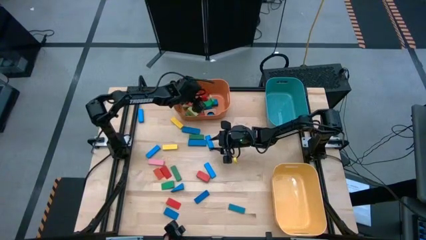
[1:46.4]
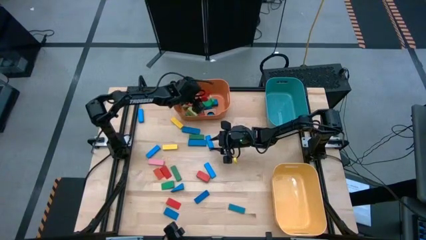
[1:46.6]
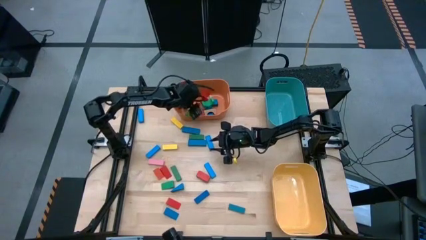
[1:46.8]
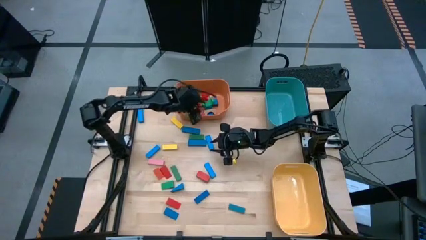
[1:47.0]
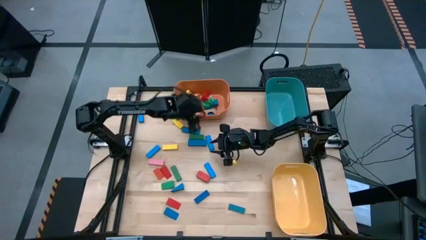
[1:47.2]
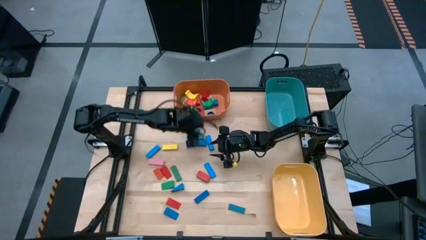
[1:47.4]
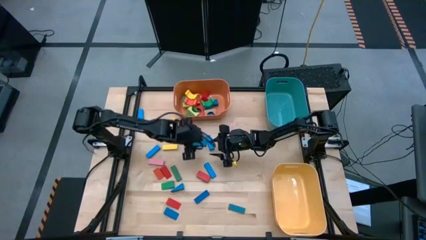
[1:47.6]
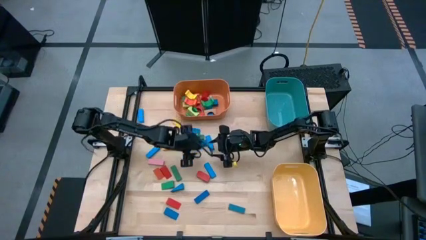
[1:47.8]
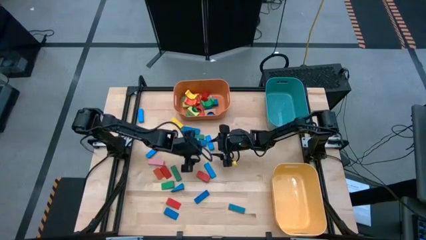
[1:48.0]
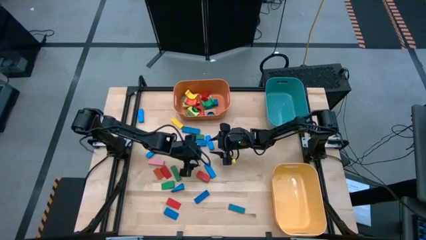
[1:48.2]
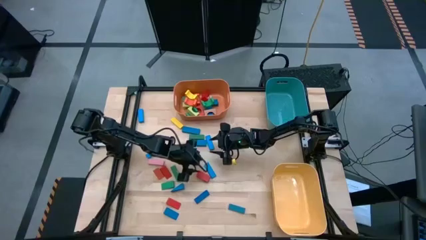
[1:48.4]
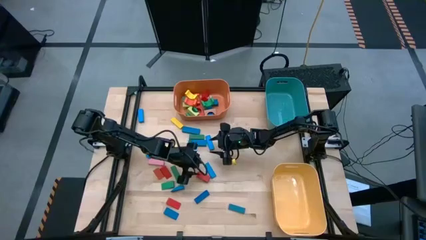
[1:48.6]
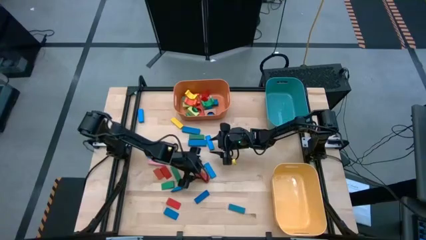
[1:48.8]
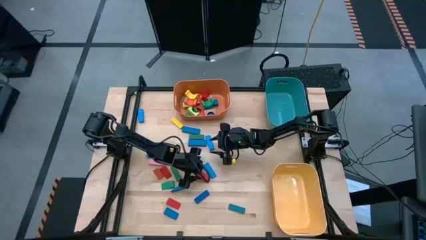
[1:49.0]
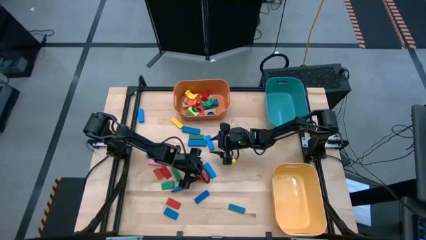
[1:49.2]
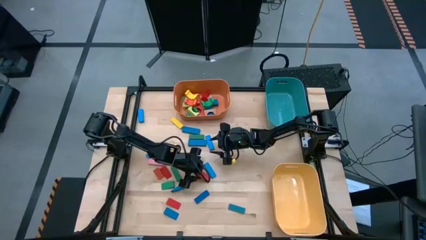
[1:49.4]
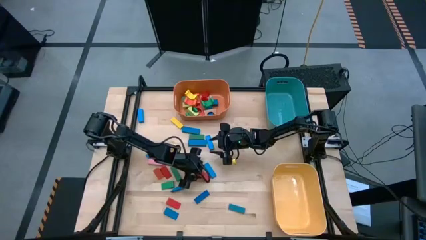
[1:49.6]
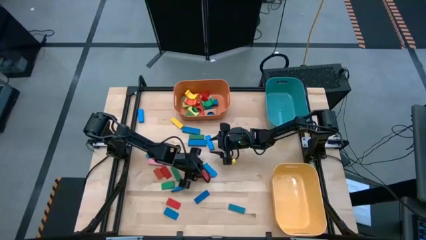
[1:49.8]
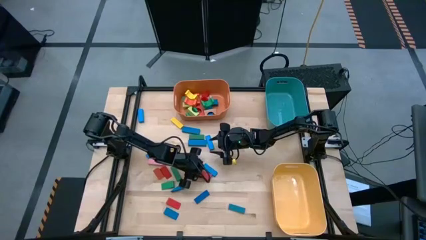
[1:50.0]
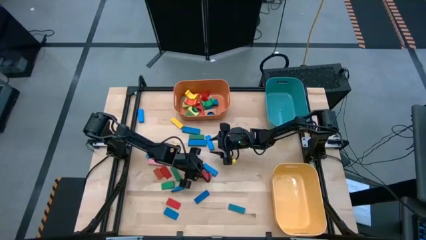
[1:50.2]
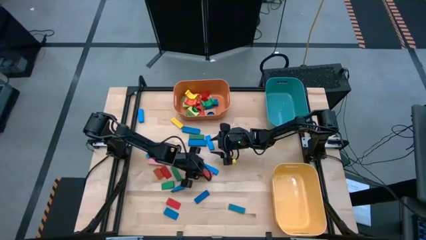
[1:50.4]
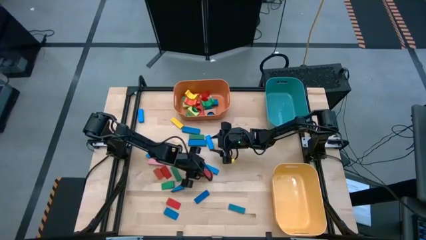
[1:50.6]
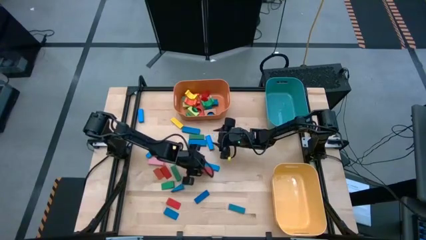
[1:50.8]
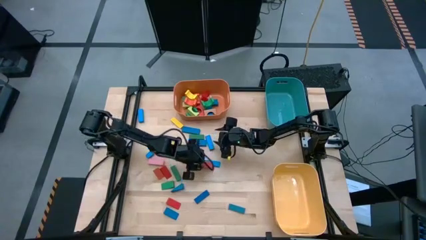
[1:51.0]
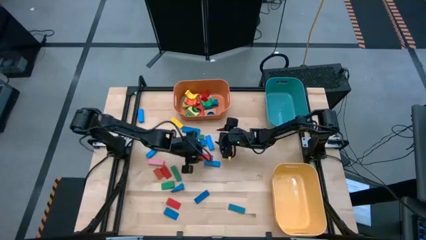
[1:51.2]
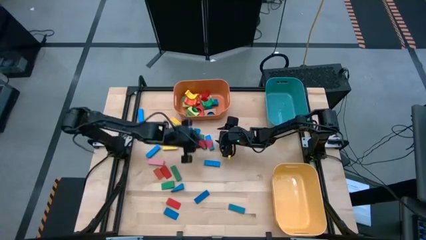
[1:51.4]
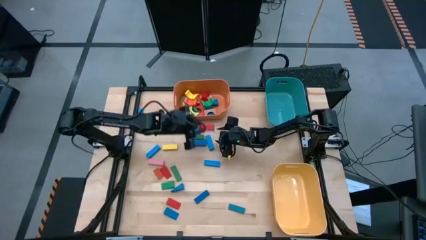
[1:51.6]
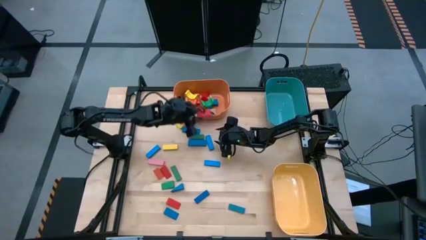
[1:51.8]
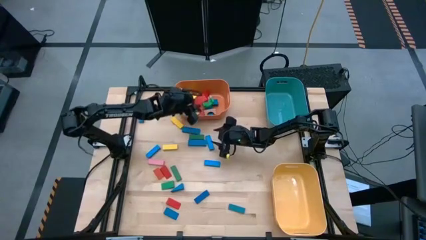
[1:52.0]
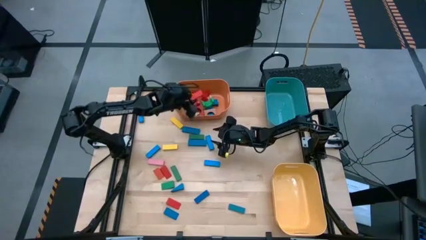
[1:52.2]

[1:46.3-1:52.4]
Task: Sort blocks by size
Put the red rectangle block into the orange bin

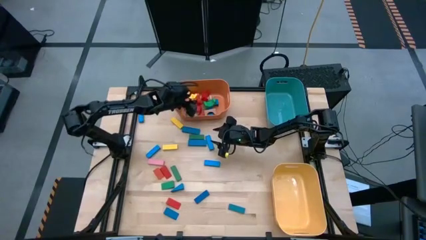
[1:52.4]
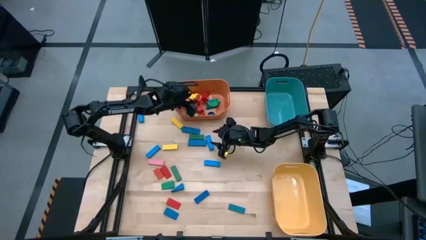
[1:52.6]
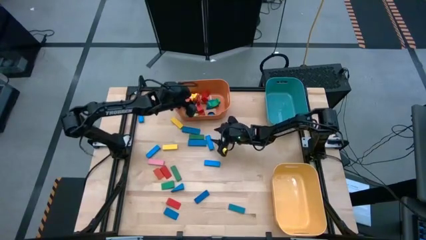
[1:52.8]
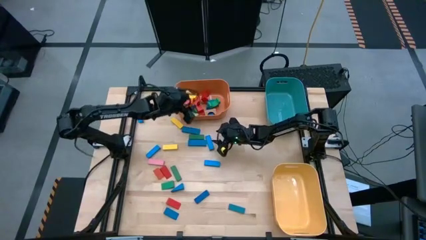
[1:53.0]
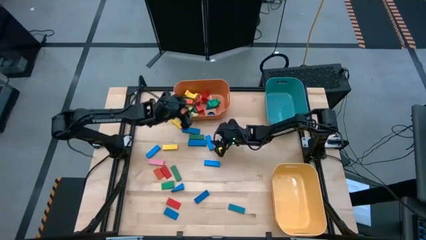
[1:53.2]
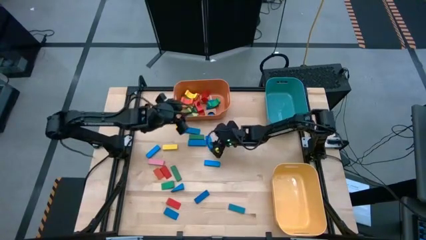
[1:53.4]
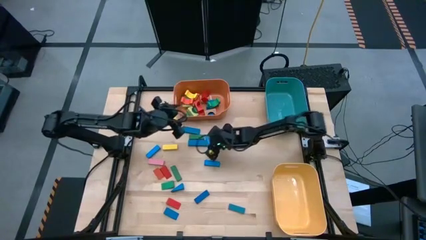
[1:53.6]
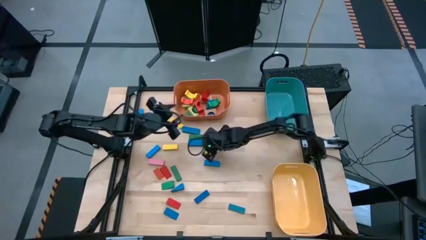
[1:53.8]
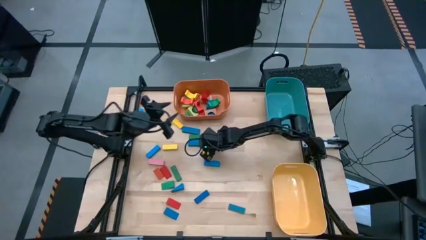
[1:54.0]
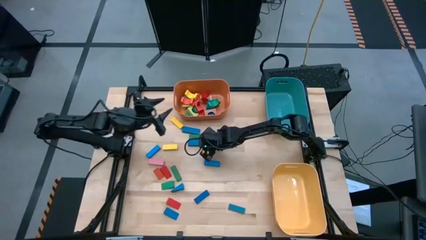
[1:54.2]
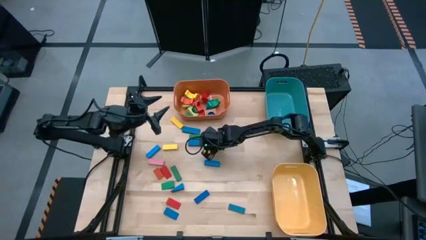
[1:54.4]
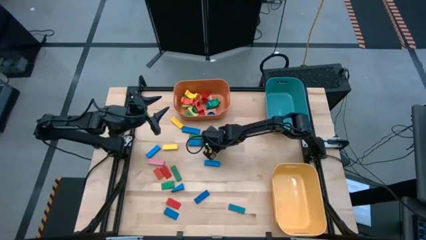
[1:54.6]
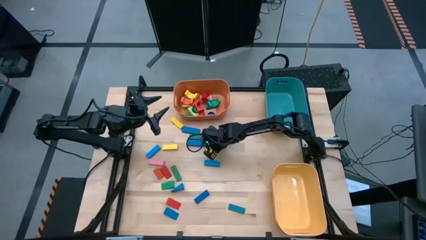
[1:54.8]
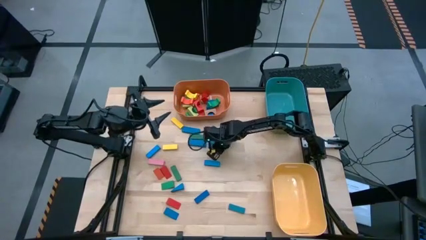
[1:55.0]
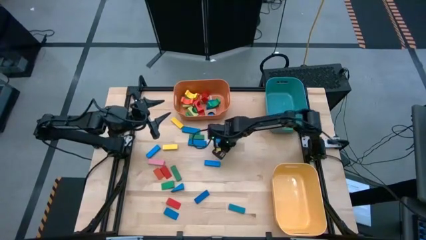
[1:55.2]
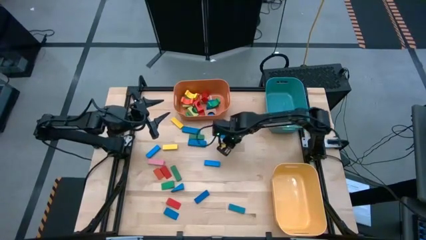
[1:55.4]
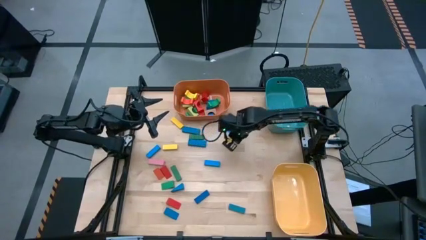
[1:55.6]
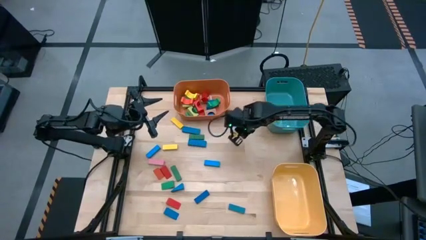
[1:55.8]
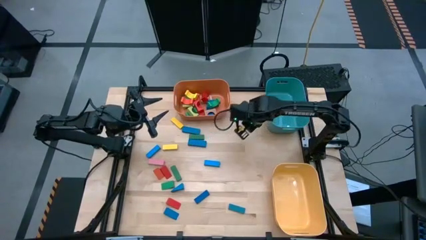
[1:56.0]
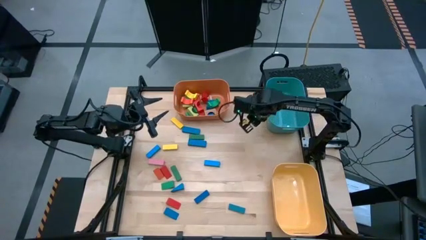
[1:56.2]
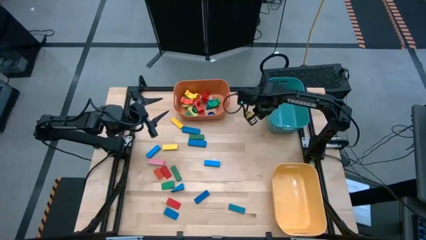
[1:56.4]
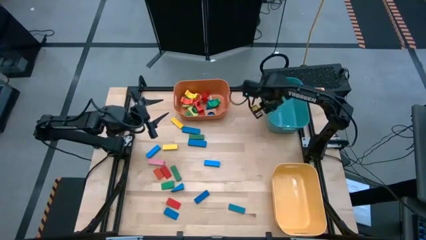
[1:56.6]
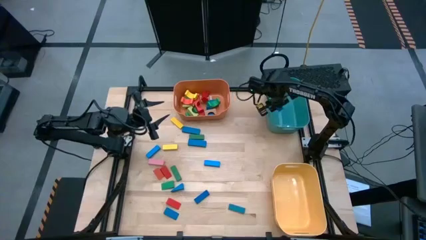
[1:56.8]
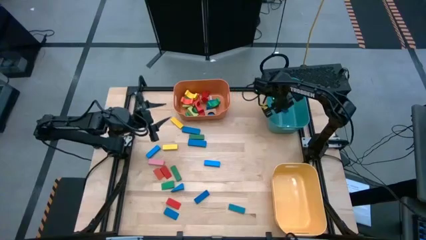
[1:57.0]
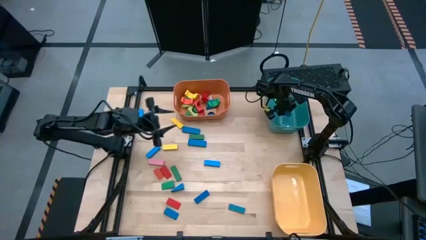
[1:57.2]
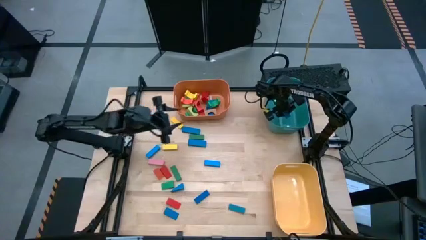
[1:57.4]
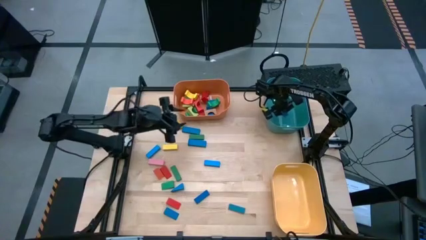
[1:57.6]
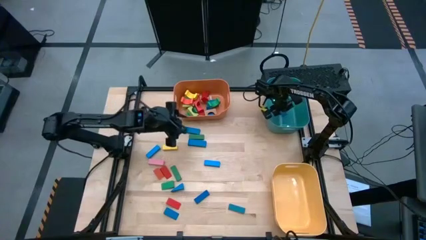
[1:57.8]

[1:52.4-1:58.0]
Put the blue rectangular block into the green bin

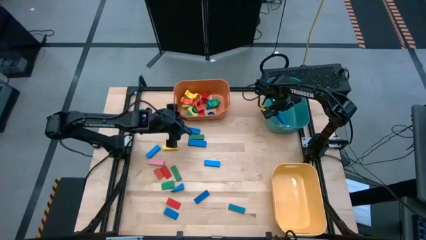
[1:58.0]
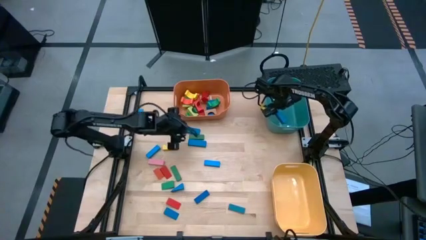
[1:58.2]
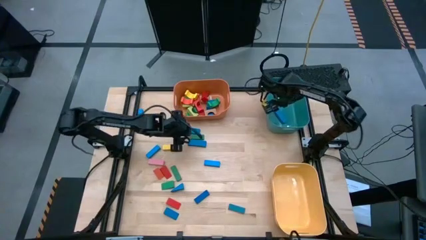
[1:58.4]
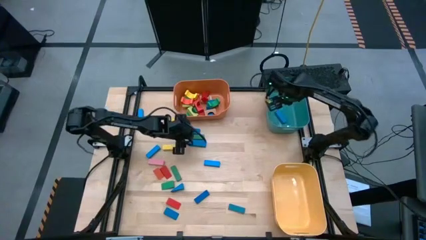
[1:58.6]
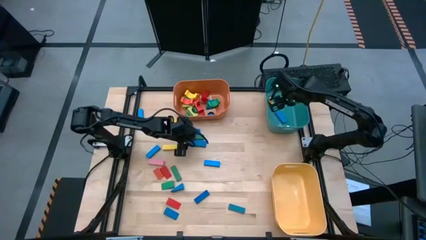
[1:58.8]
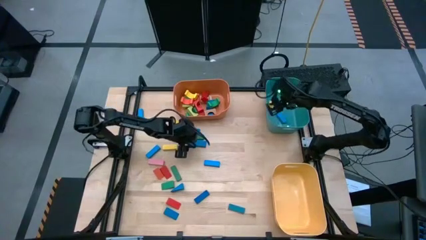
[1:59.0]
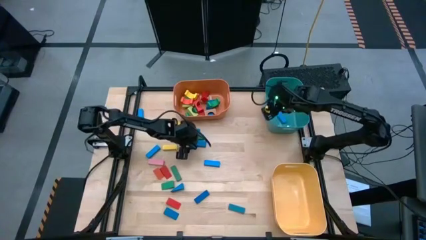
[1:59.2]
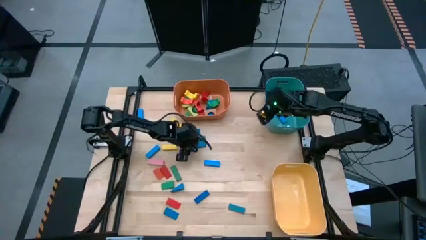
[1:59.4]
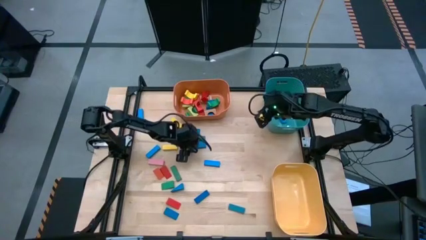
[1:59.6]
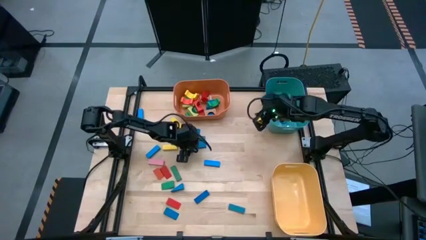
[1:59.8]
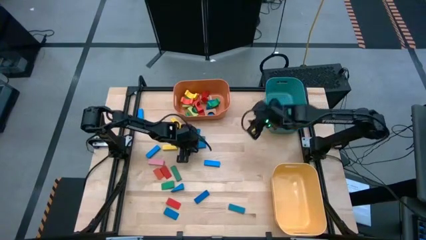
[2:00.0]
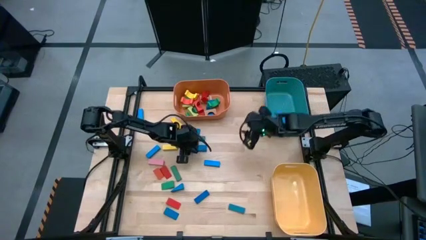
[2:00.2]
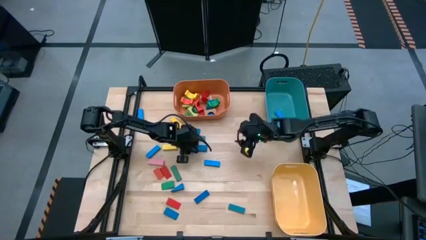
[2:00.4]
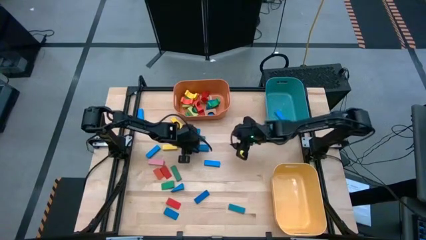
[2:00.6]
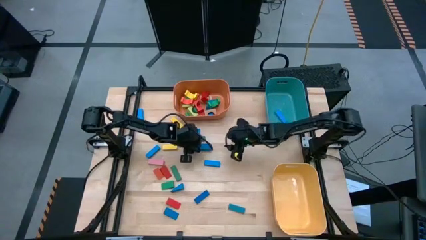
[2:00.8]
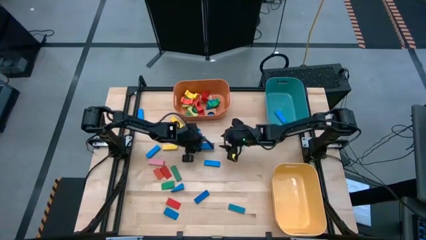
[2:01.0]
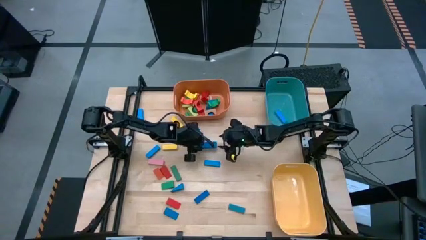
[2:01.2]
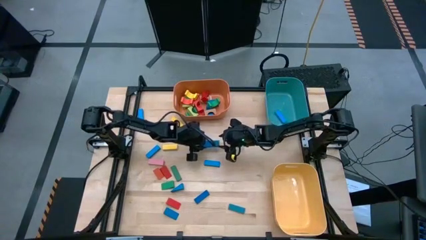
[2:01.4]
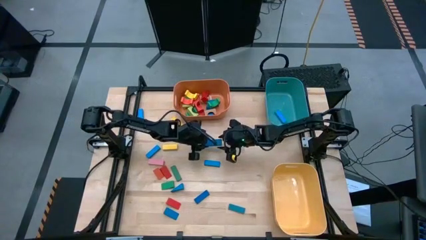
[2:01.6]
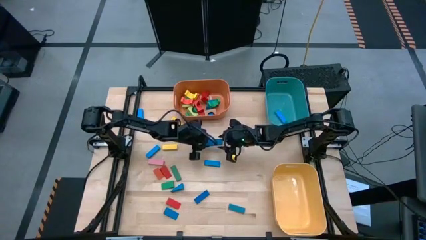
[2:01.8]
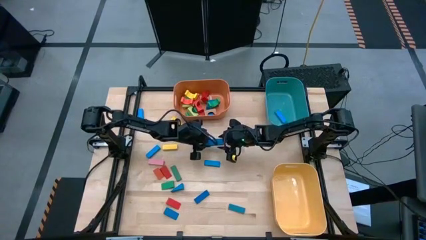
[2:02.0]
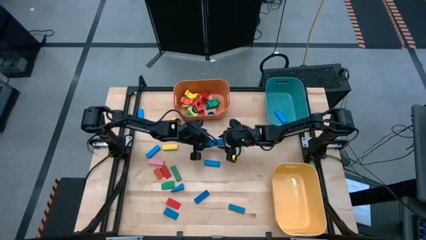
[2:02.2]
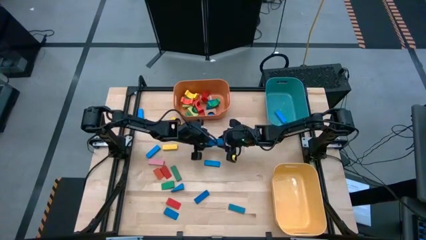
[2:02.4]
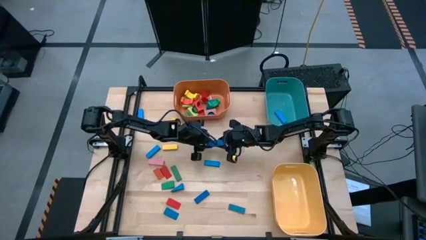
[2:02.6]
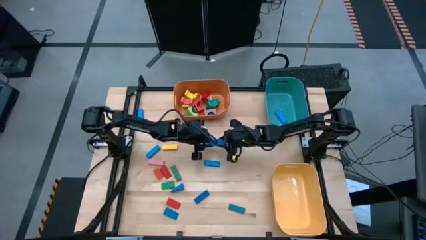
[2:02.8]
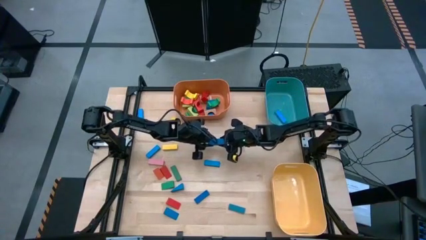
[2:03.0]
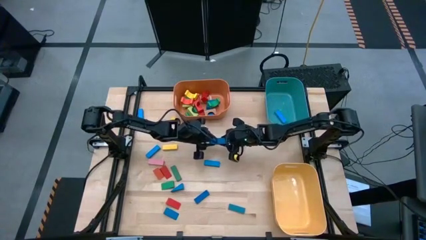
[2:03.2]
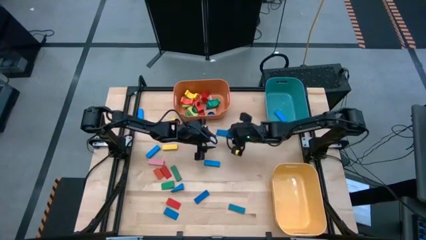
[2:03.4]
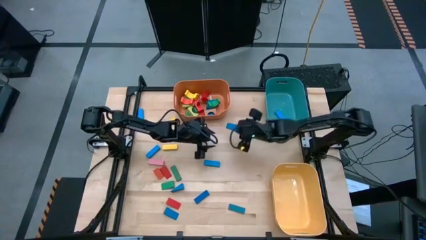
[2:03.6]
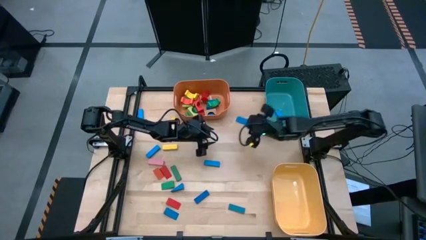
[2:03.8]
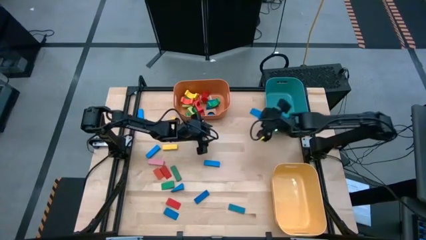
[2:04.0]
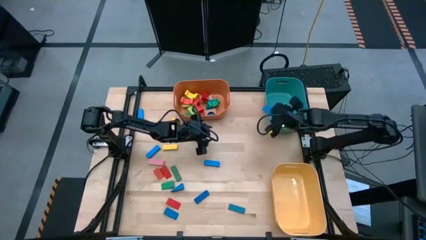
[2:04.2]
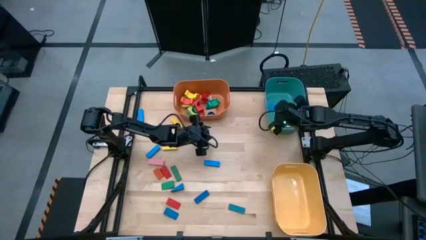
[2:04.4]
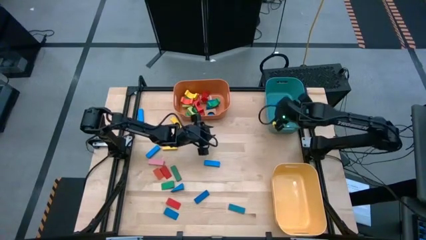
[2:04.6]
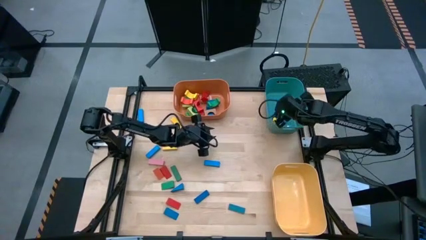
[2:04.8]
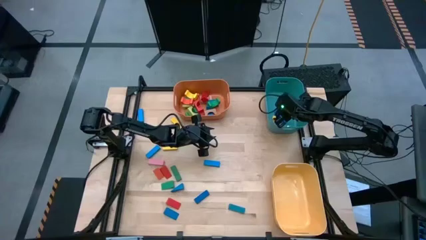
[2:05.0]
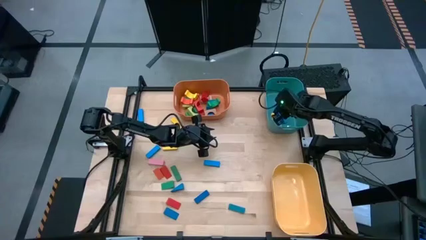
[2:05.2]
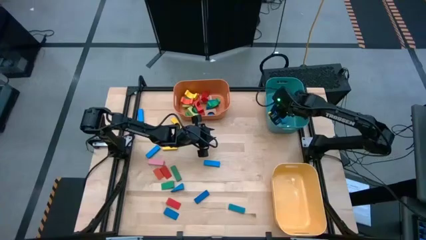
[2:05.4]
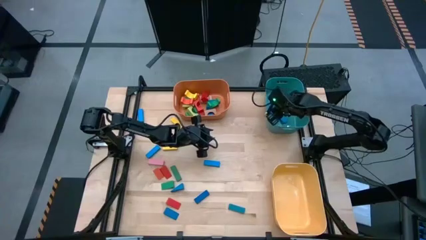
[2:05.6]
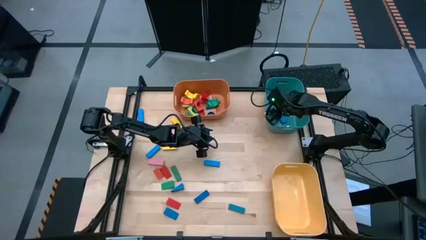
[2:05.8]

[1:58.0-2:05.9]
Put the blue rectangular block into the green bin
